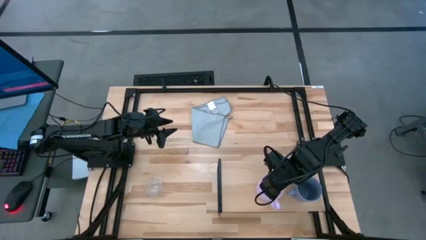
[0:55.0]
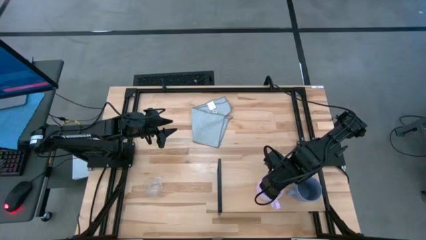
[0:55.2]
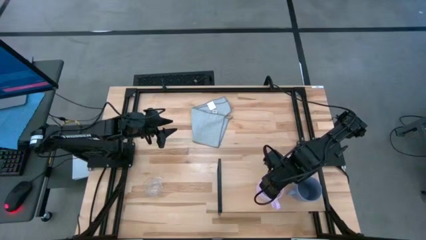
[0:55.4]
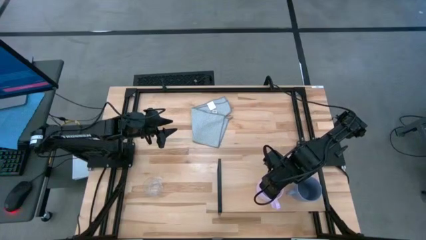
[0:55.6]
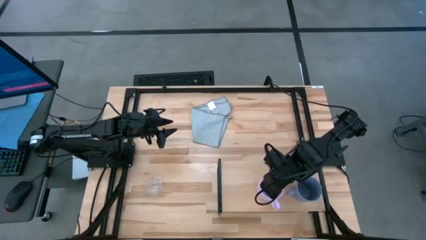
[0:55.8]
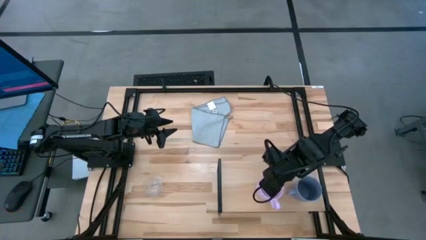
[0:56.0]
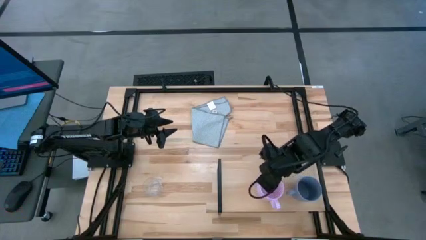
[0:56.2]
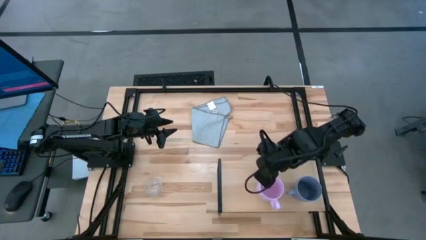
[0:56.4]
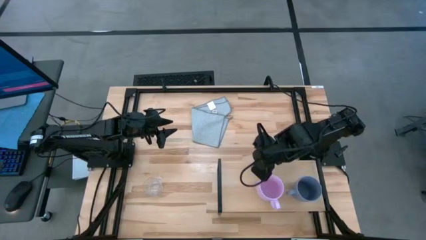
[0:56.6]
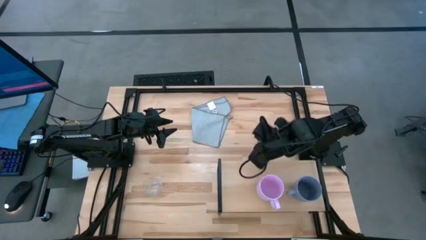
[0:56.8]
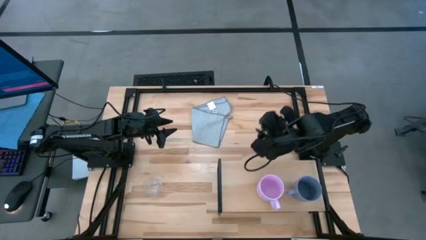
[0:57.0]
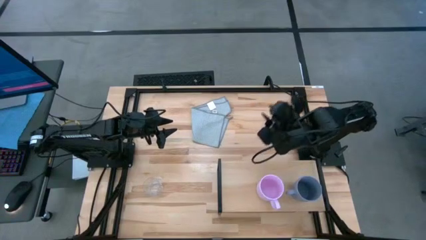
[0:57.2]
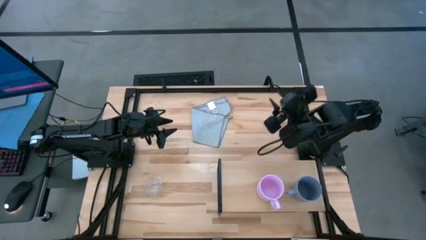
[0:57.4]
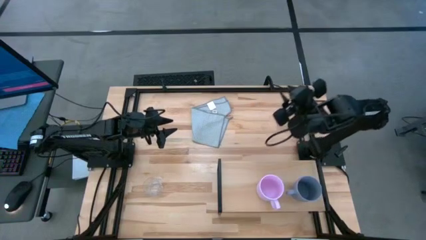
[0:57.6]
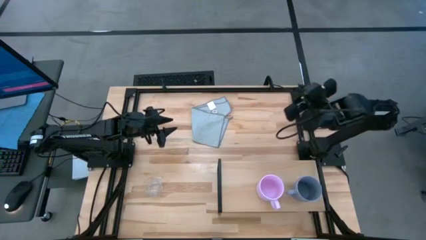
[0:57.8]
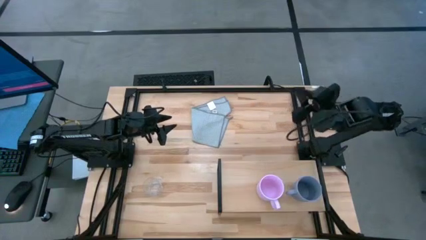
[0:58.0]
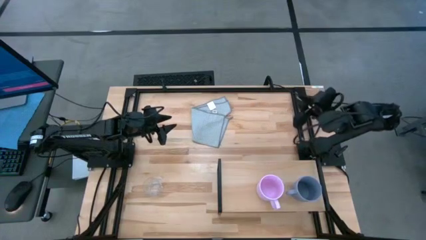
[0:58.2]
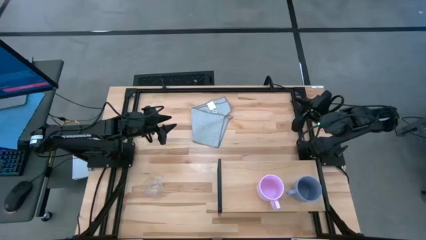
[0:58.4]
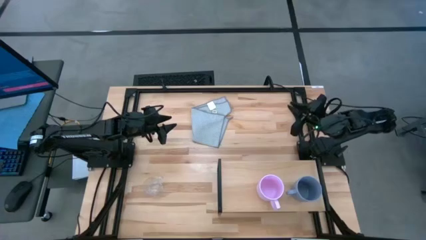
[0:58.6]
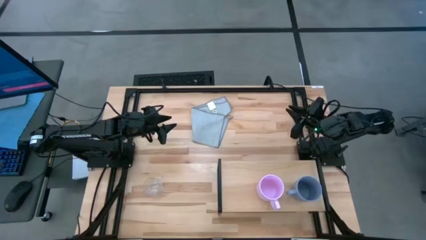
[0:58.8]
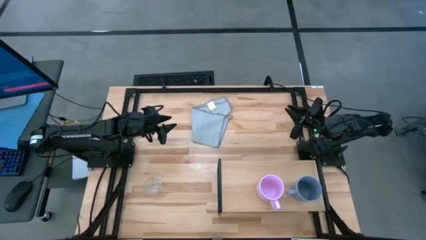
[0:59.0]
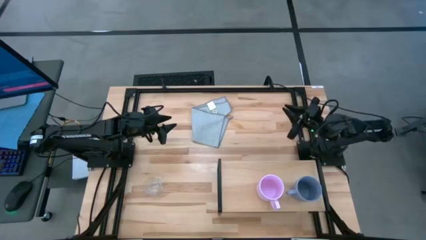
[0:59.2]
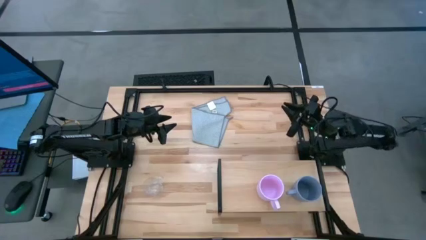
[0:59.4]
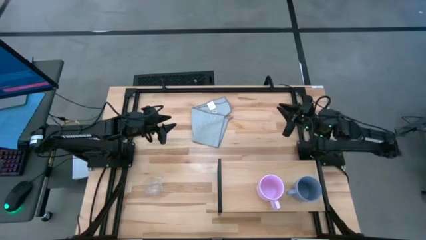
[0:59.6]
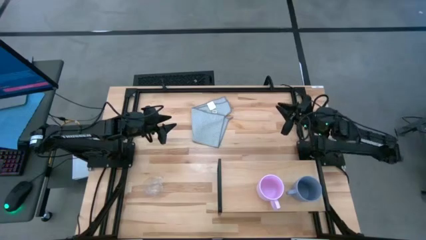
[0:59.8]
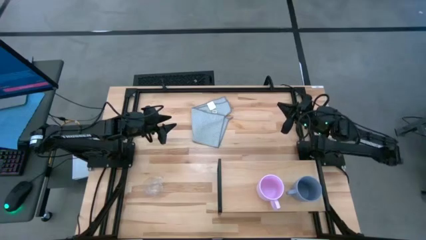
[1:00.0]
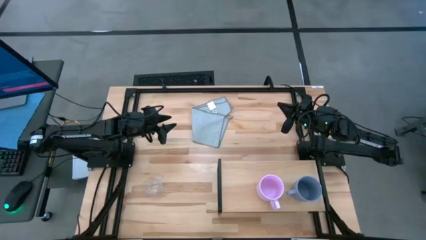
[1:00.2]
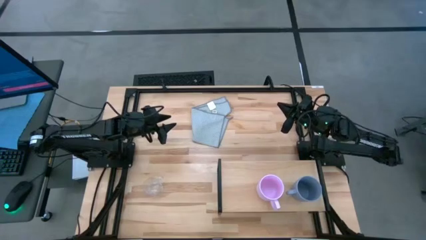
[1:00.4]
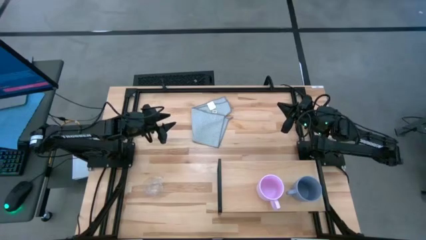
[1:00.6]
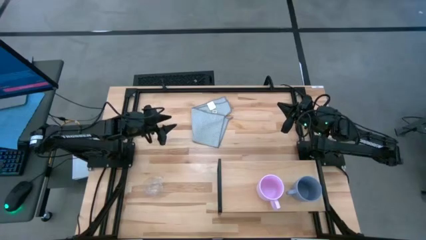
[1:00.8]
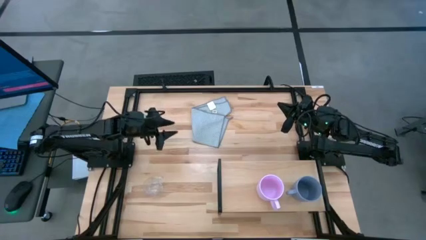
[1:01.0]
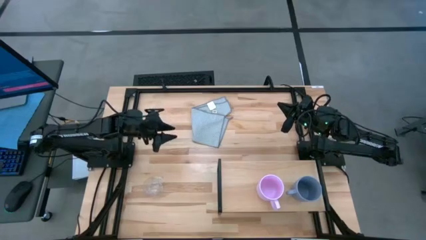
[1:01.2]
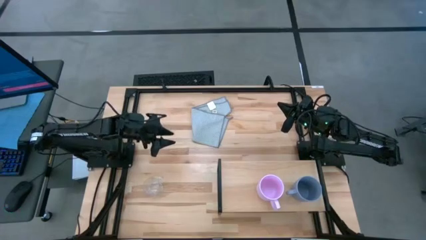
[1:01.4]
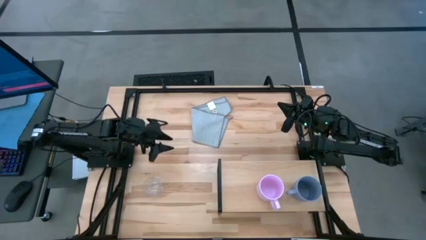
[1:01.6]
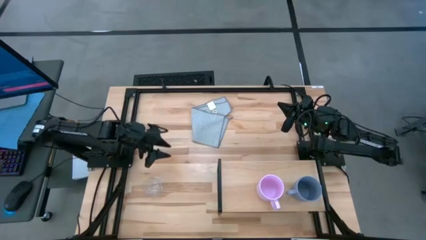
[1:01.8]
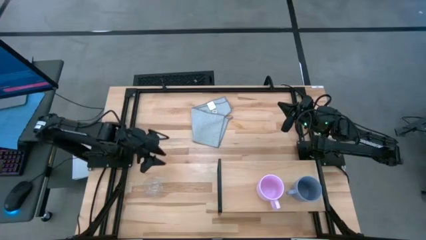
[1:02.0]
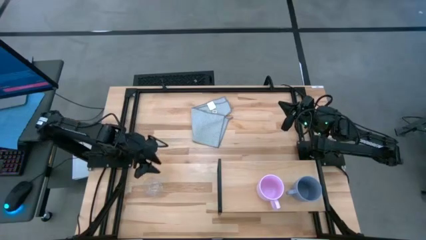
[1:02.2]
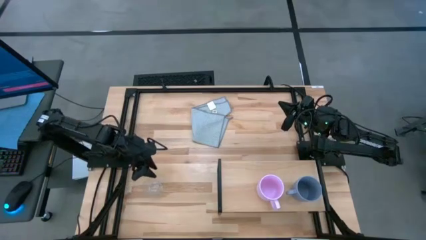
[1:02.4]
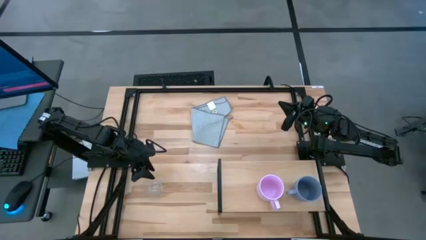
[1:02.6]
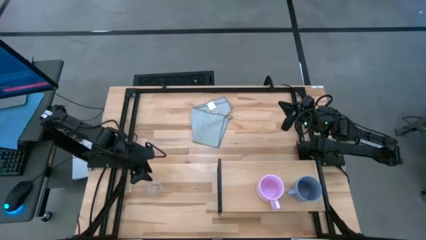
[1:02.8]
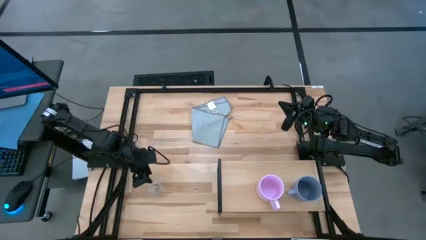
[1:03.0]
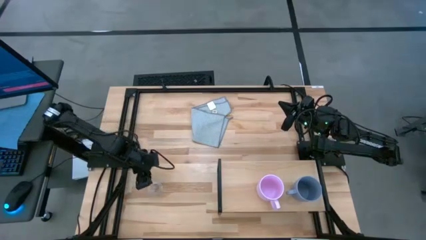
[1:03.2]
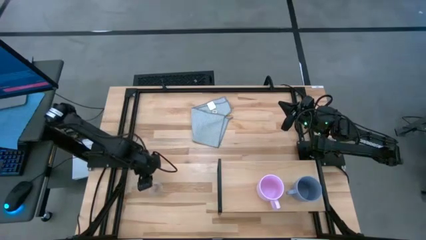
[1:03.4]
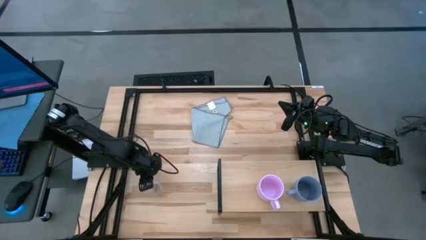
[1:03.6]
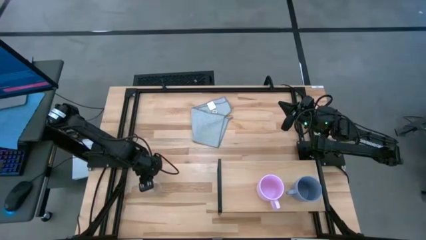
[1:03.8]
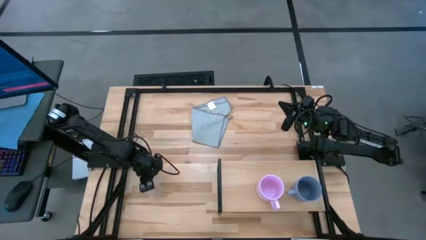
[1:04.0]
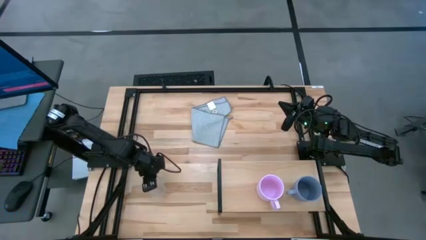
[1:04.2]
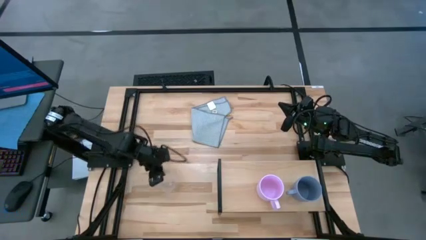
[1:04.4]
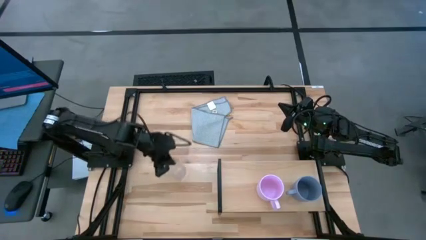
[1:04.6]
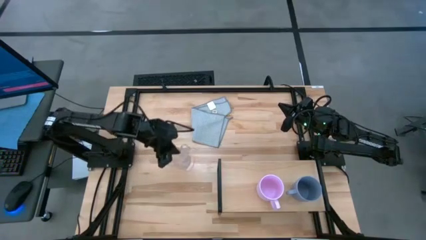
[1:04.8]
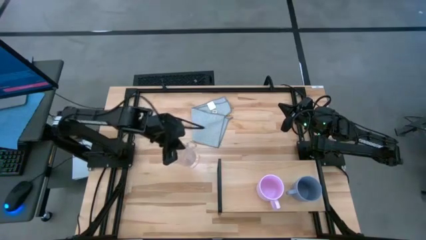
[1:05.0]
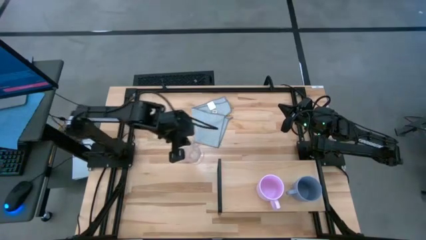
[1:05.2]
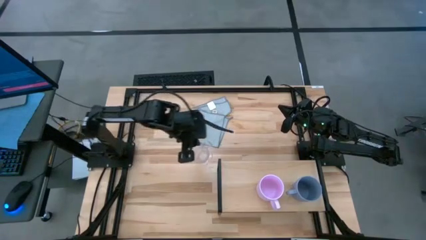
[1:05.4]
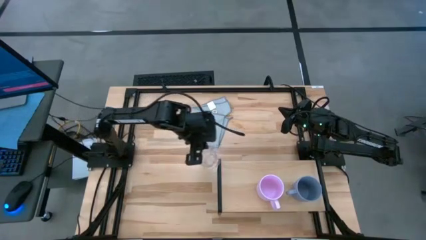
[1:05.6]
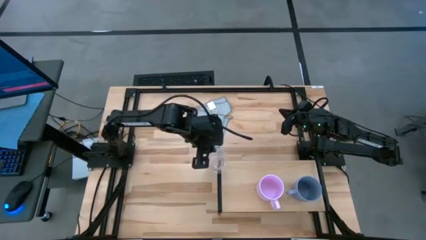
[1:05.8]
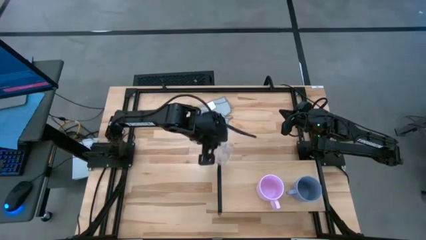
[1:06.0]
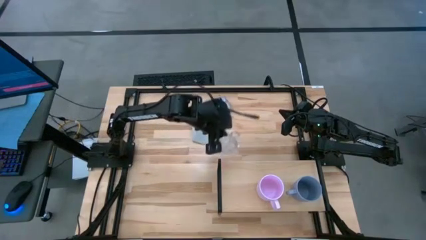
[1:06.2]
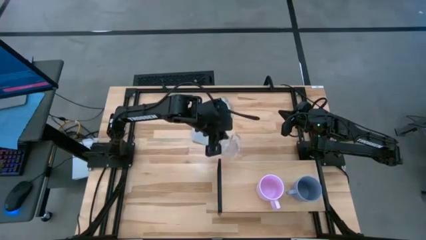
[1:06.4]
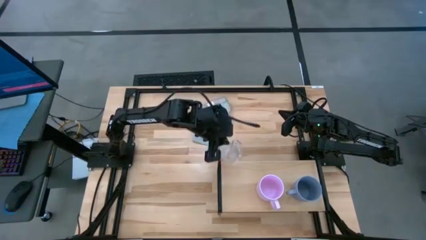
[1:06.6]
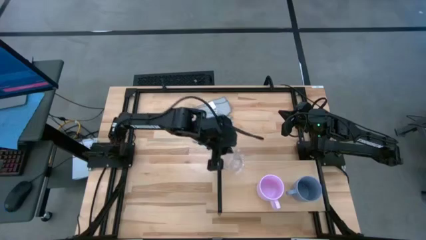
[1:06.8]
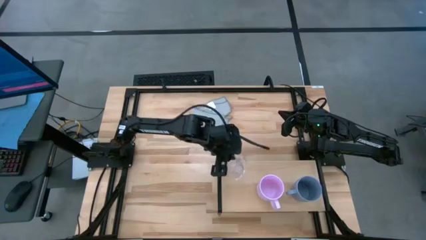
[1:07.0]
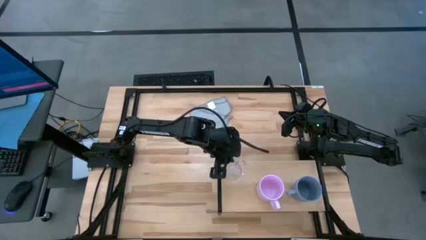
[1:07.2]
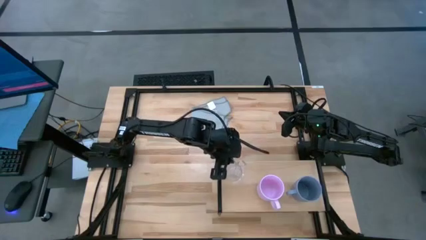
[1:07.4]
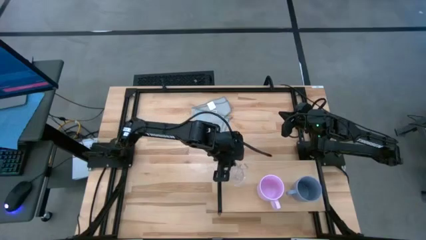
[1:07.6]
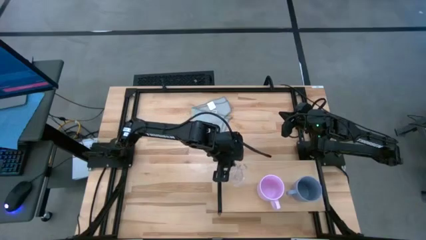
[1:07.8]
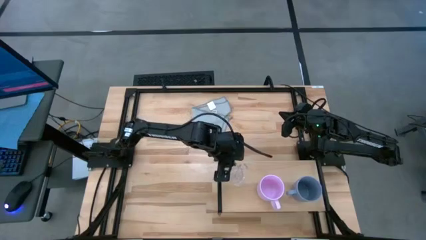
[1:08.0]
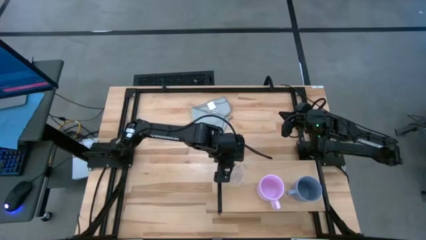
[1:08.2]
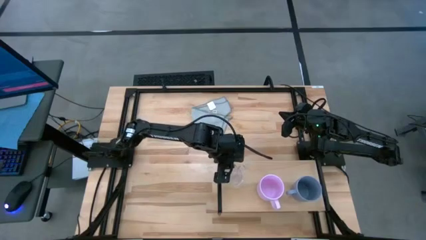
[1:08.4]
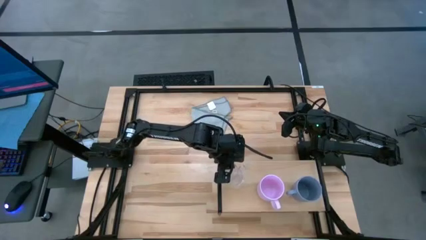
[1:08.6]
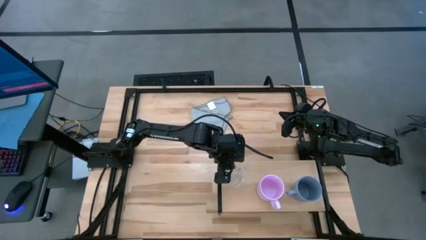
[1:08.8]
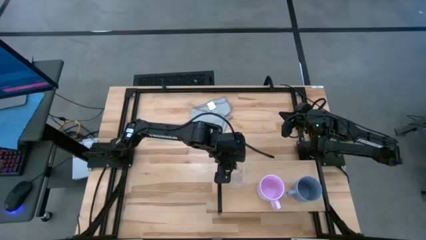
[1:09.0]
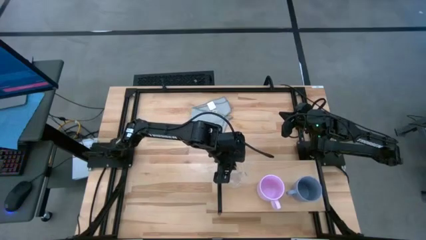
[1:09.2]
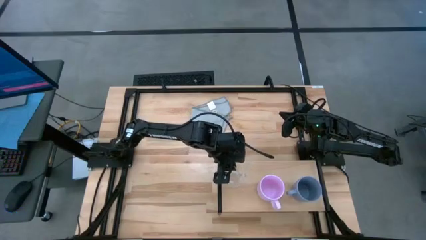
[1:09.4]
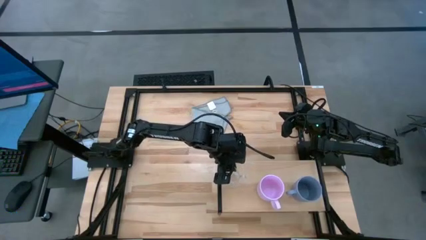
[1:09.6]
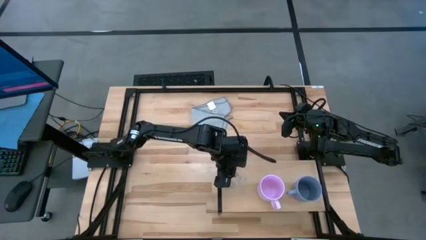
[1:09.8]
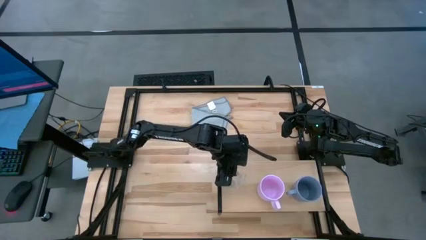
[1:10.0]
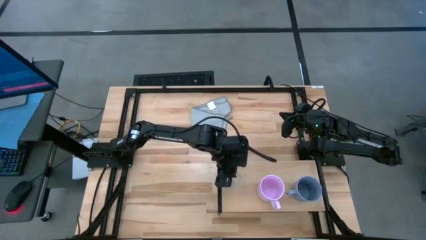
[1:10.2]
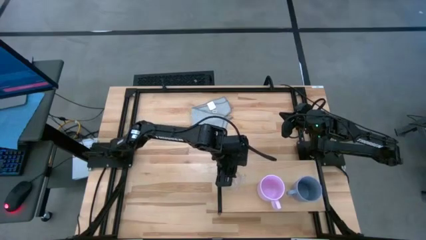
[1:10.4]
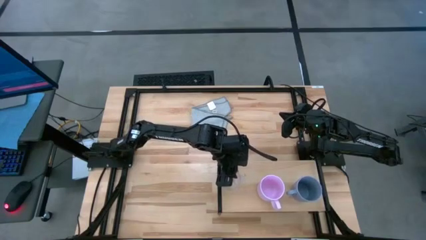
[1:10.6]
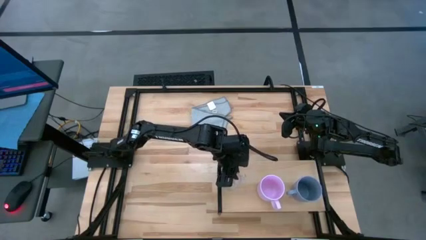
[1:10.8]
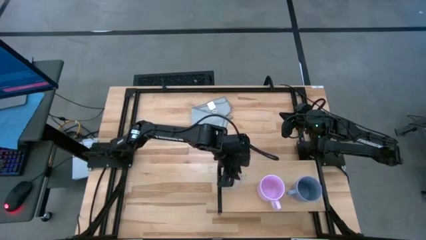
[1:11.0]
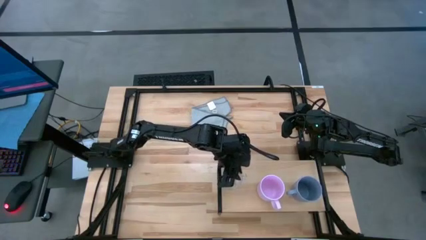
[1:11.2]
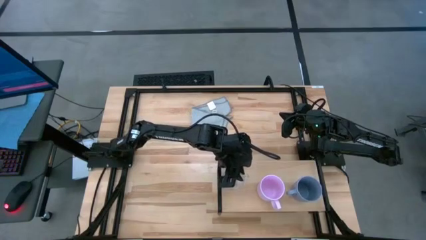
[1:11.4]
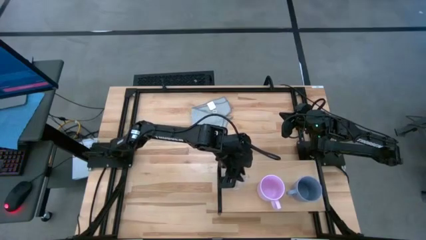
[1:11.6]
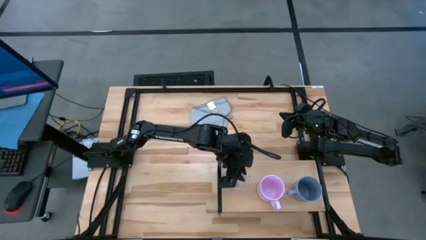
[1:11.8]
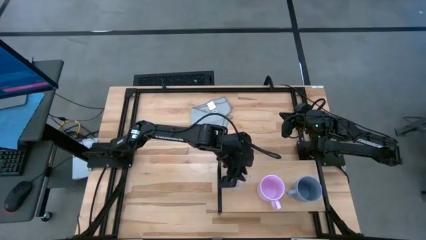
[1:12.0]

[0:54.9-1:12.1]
Task: Stack small to large cups/mugs on shelf
Put the transparent mug on the shelf

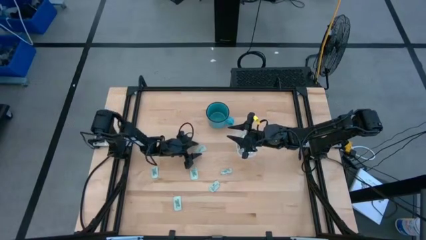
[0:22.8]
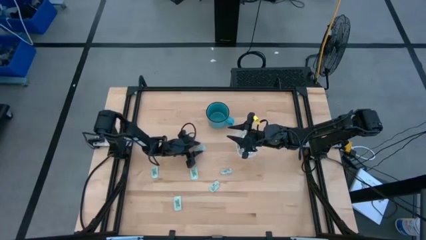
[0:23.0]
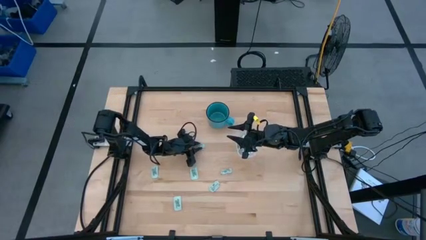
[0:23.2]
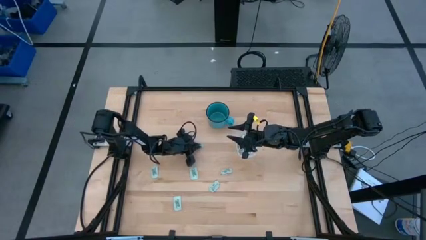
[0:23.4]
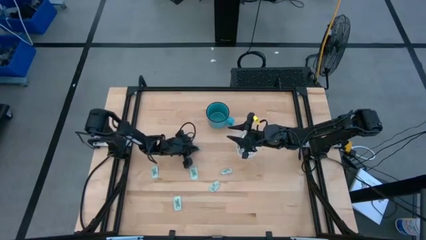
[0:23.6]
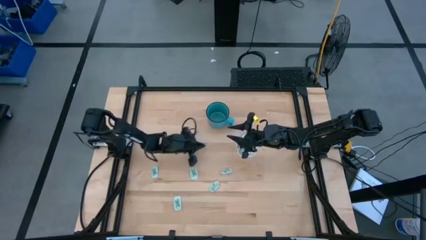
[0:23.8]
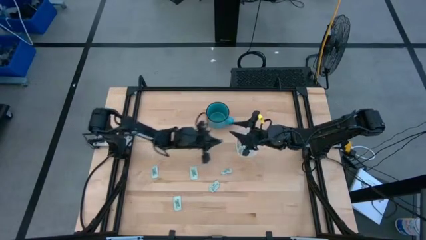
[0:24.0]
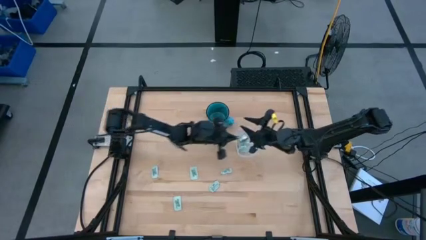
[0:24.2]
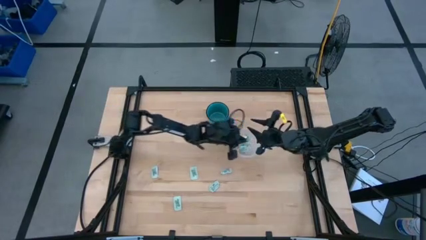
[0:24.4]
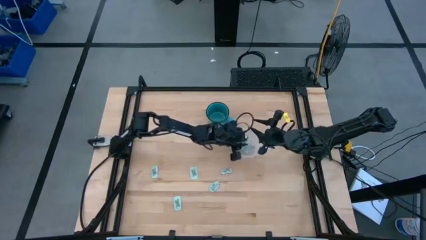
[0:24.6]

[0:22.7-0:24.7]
Task: Pick and place Stevia / Truvia into bins
Put the stevia packet into the transparent bin
